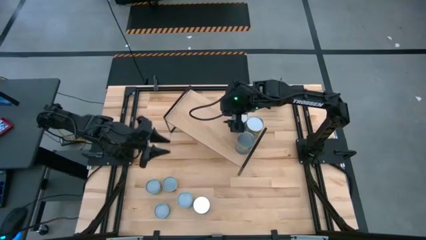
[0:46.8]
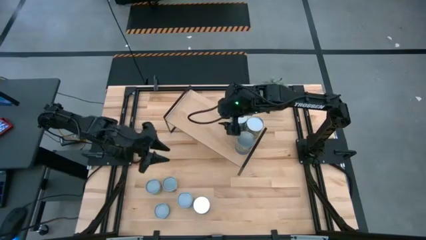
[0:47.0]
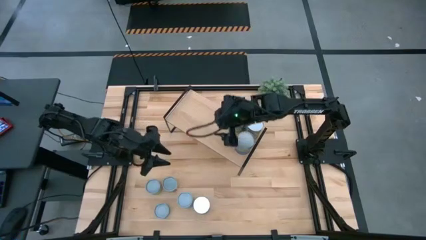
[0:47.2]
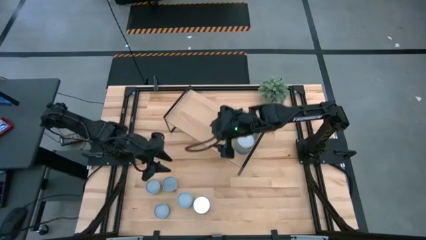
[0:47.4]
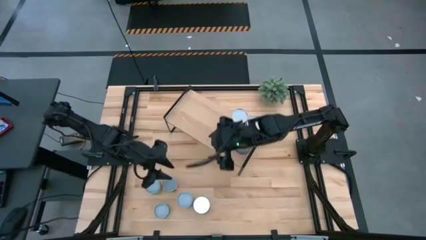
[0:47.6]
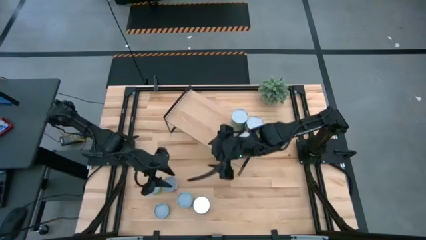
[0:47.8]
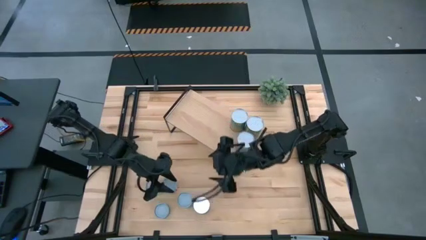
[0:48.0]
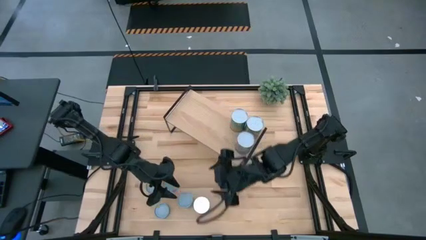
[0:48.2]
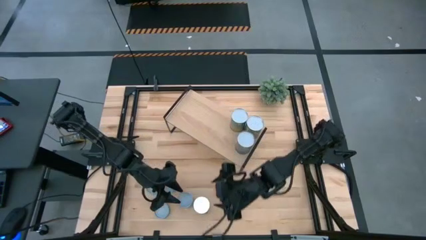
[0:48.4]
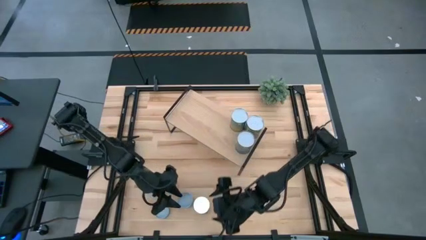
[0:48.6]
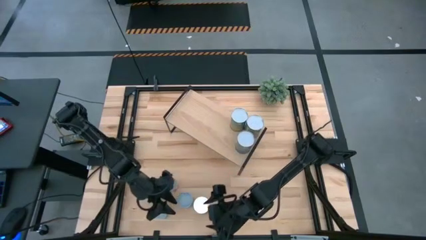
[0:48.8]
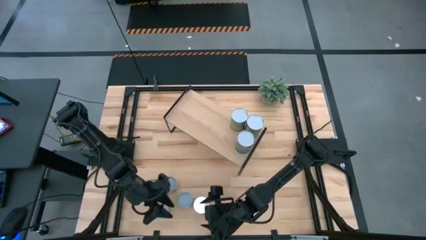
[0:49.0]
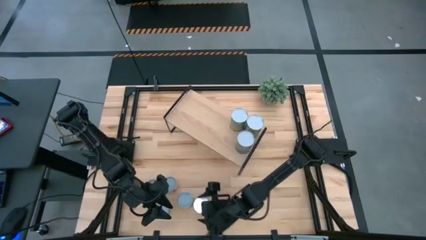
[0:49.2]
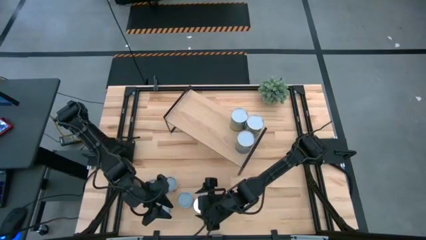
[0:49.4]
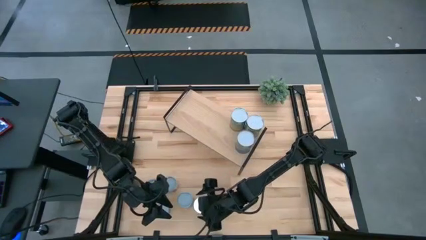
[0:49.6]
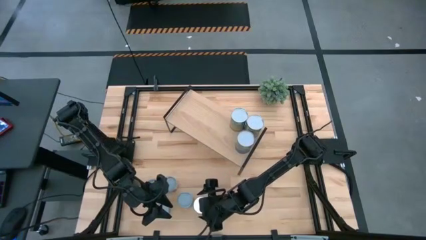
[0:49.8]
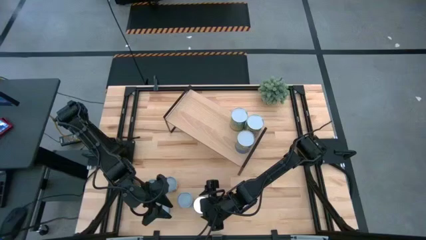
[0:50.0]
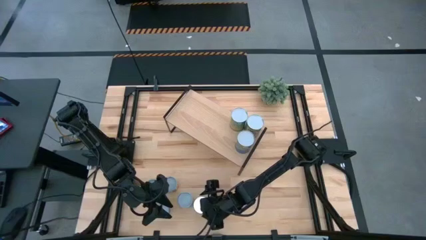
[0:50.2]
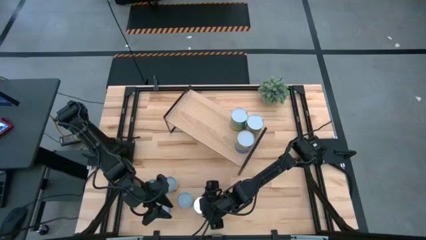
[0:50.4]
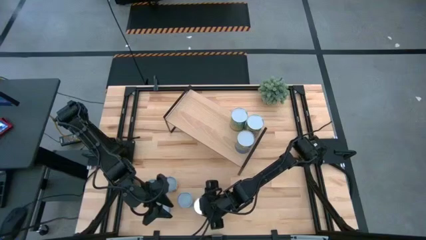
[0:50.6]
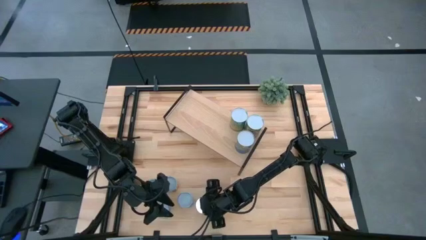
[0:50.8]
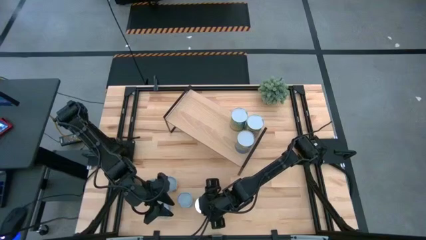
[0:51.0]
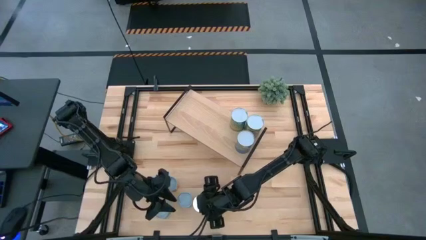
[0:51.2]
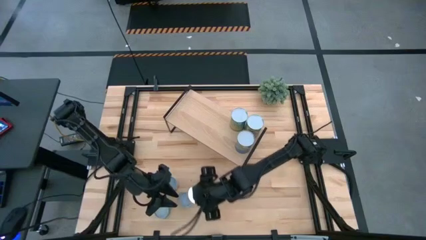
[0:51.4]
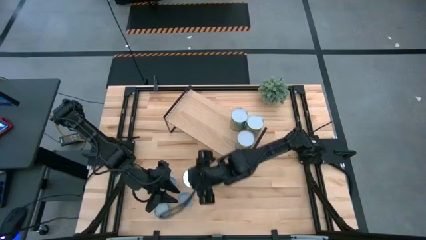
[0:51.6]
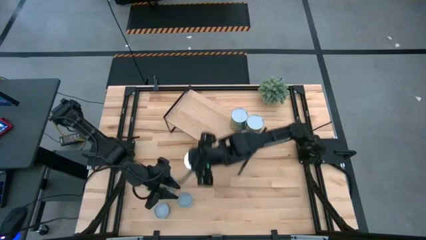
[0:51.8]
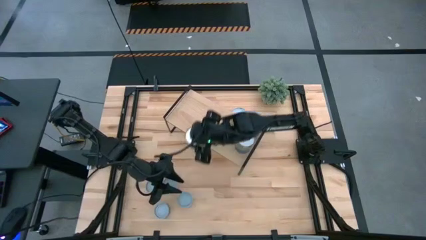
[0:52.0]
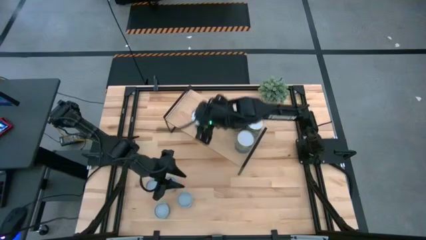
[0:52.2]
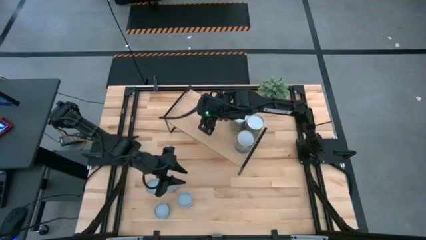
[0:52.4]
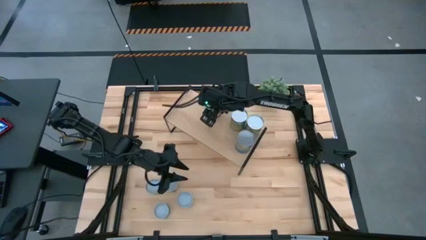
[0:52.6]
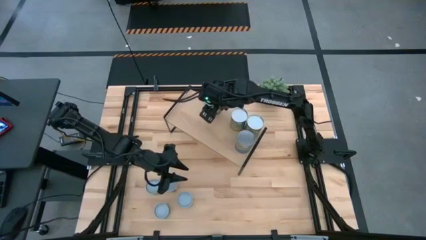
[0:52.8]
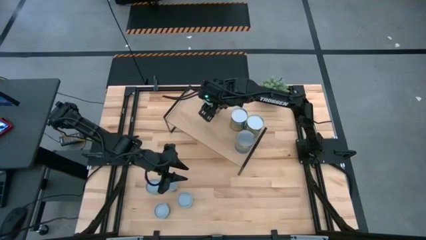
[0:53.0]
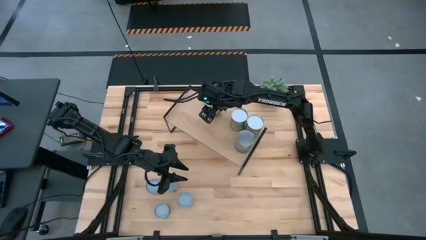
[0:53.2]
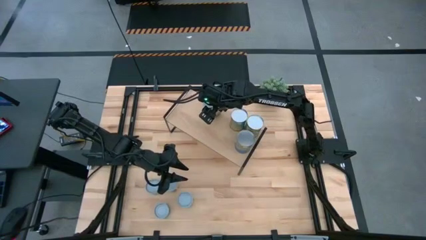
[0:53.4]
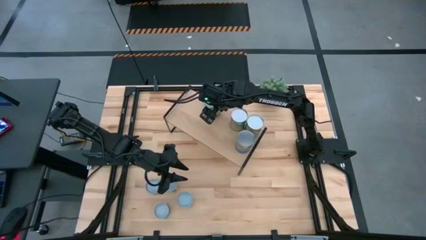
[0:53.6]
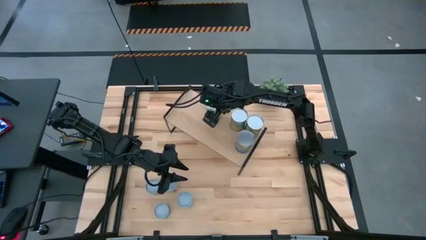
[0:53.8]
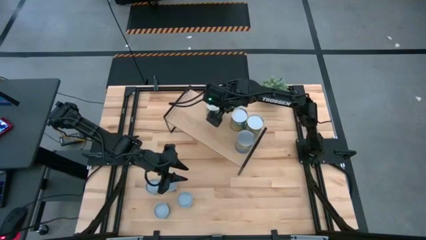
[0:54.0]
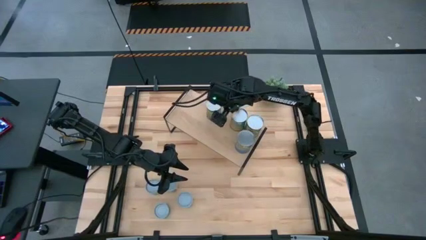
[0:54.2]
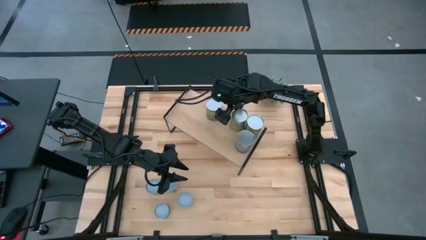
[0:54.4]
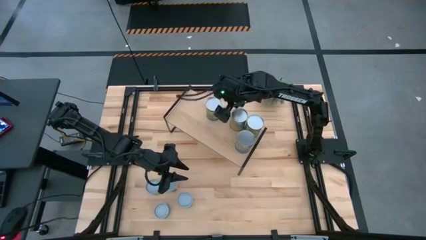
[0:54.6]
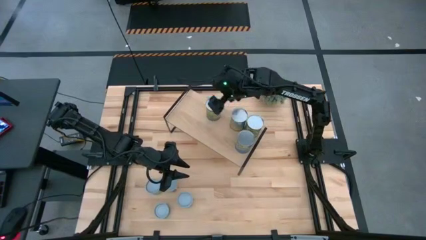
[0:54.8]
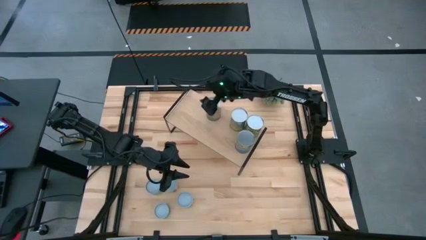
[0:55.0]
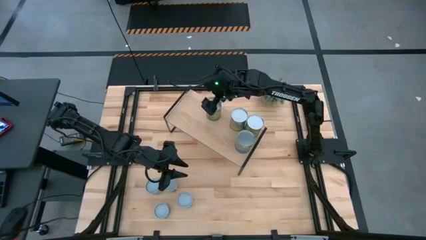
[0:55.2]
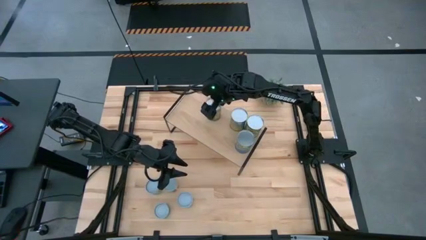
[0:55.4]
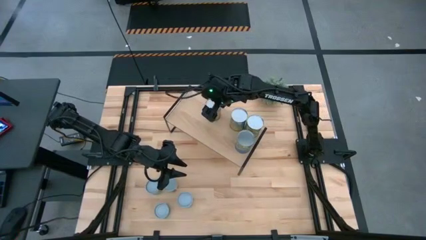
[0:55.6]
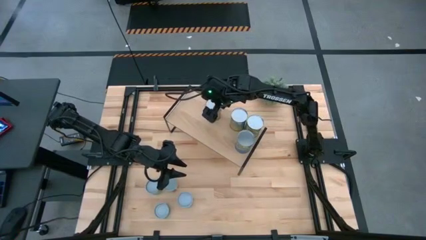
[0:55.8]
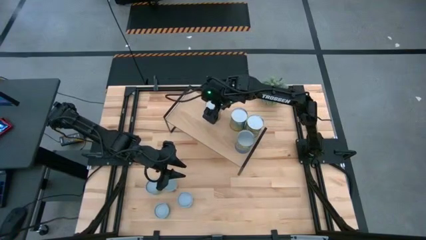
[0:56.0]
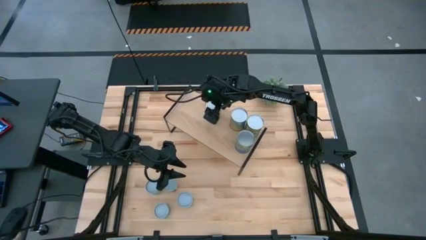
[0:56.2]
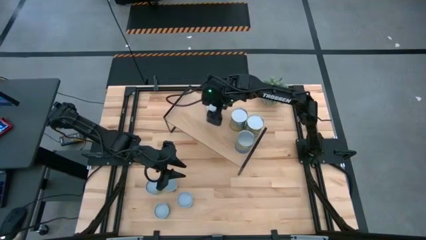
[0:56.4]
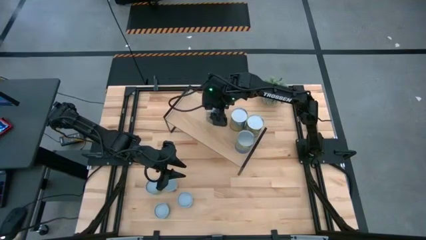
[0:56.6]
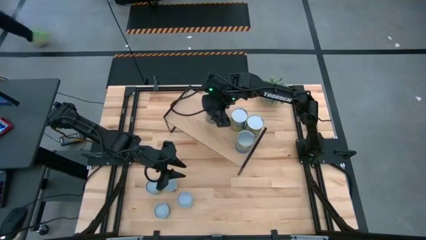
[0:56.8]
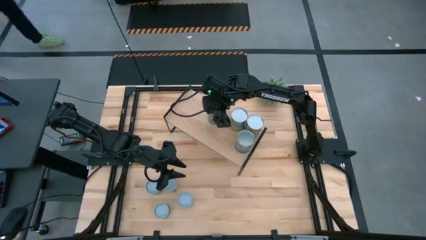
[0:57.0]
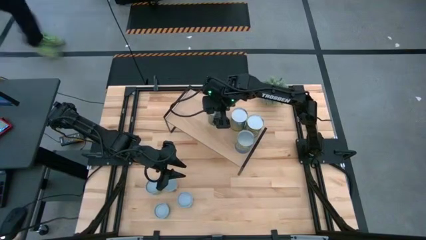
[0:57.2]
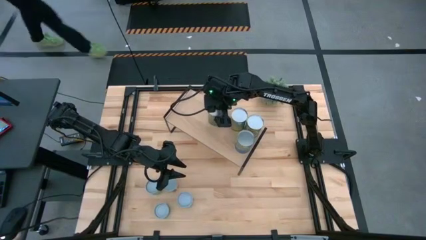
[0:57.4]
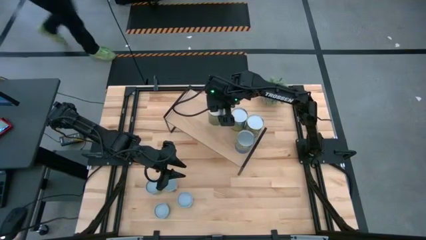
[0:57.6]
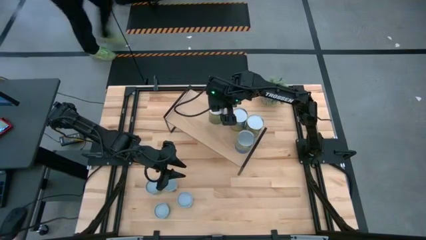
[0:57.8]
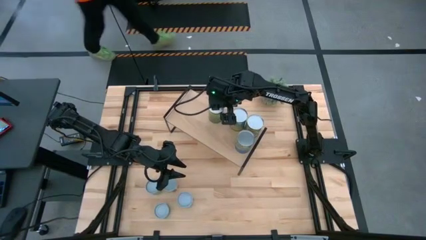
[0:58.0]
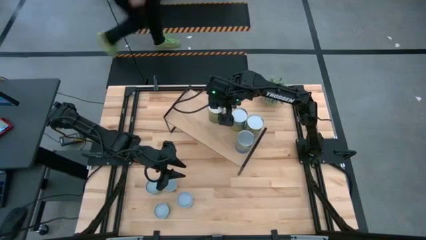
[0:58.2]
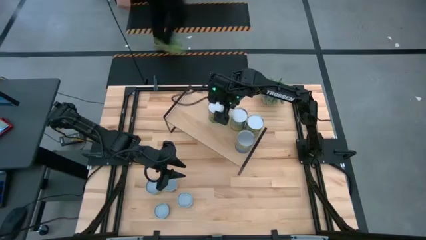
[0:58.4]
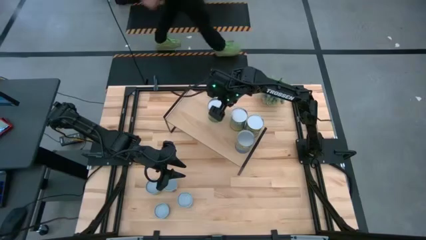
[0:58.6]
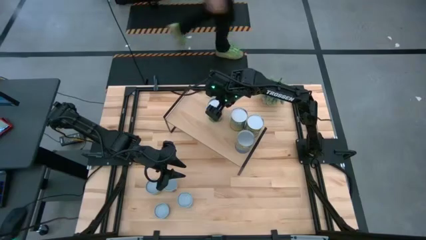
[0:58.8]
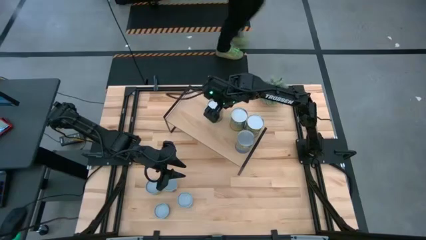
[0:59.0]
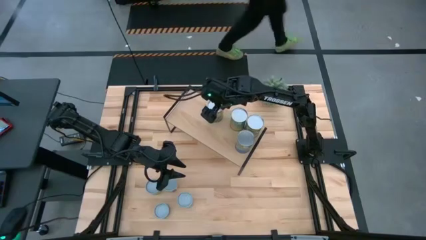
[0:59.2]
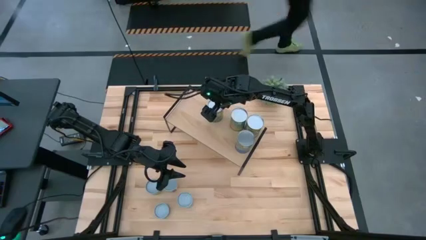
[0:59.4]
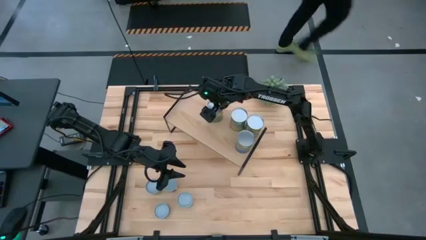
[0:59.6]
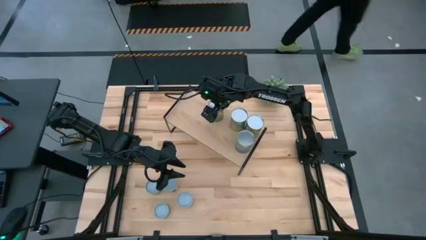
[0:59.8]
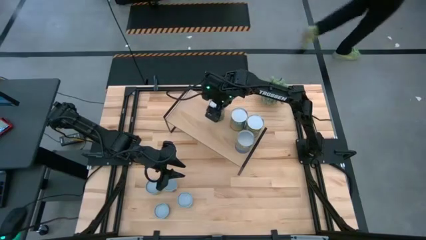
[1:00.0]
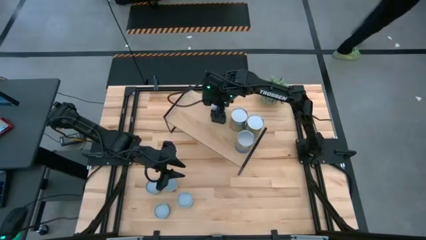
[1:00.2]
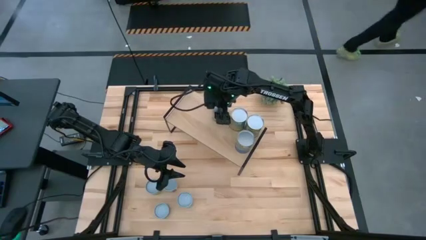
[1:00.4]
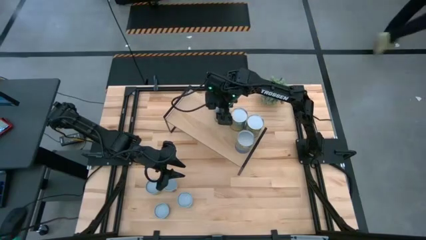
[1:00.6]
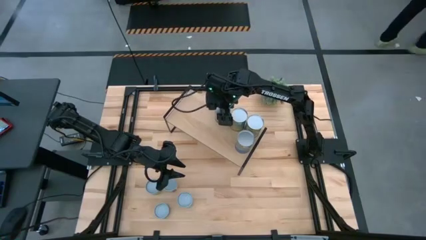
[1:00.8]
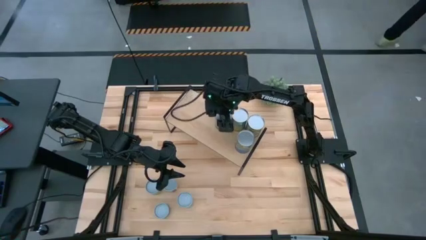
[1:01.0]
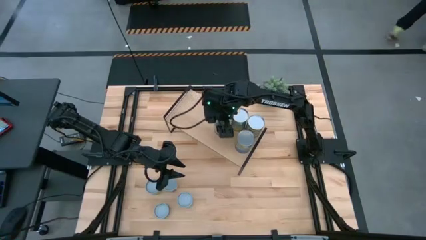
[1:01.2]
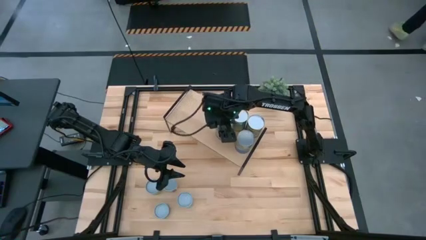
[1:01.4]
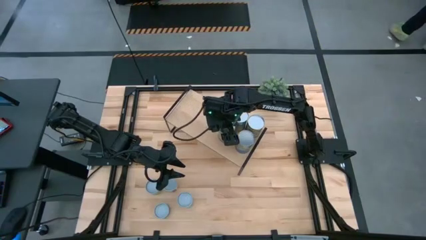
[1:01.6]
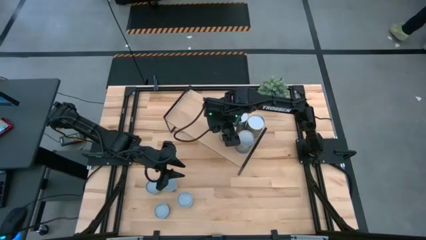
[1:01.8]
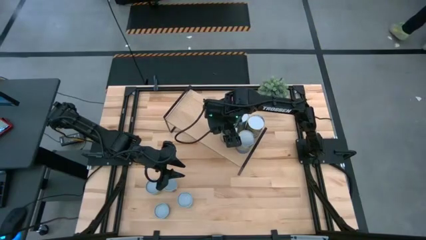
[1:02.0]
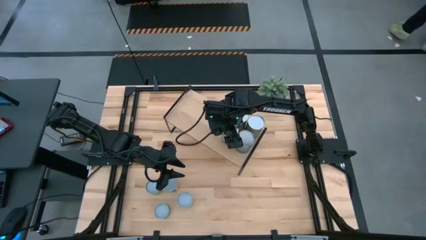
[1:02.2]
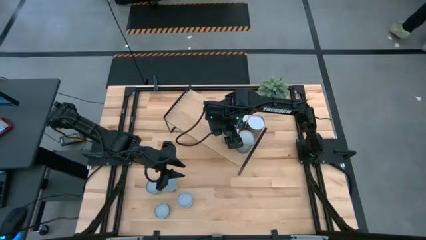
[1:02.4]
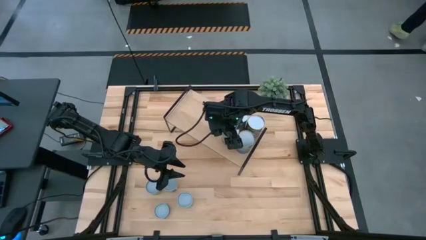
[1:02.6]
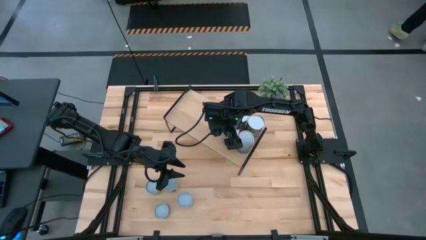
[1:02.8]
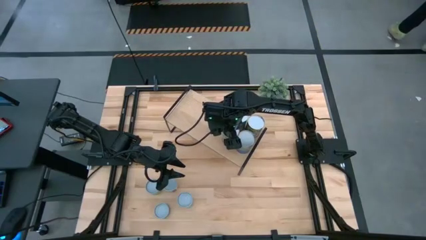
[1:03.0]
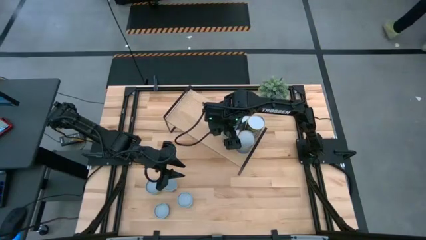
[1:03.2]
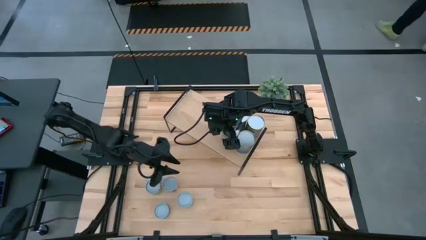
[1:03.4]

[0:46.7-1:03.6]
Task: Pick and place cans onto a shelf
Put the canned oranges on the shelf
